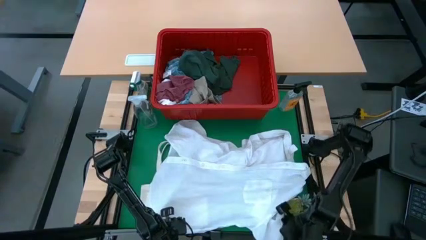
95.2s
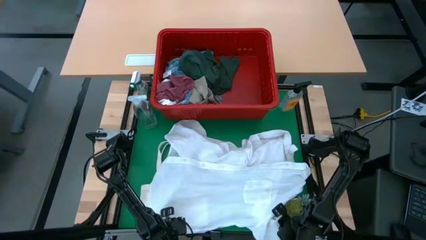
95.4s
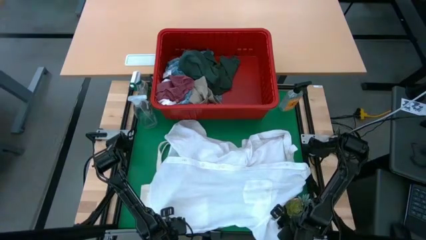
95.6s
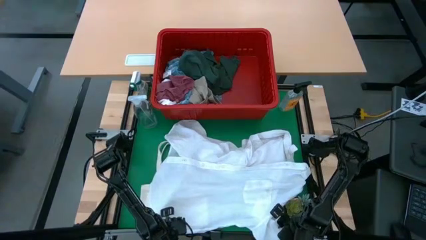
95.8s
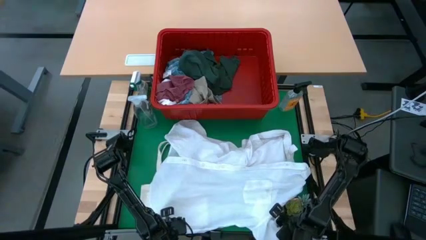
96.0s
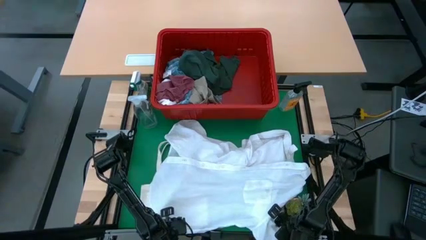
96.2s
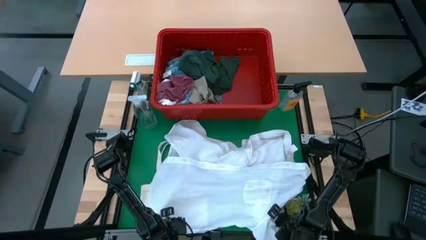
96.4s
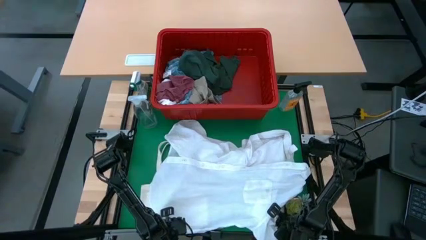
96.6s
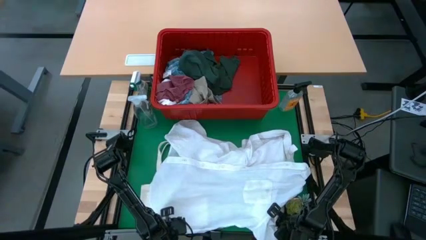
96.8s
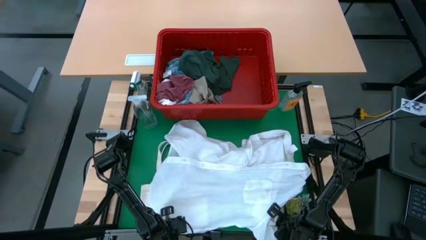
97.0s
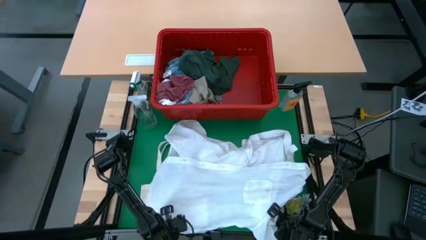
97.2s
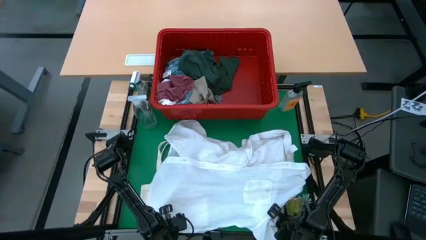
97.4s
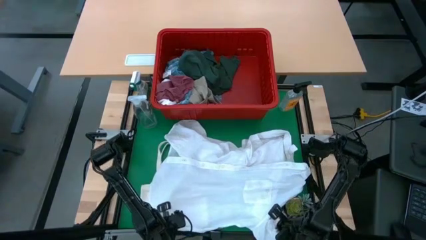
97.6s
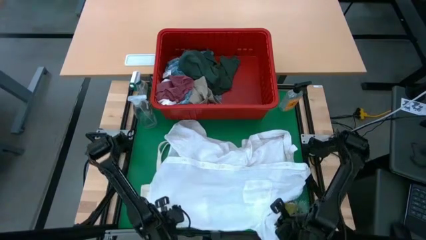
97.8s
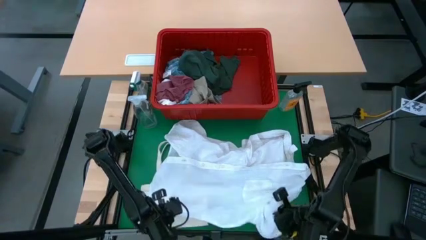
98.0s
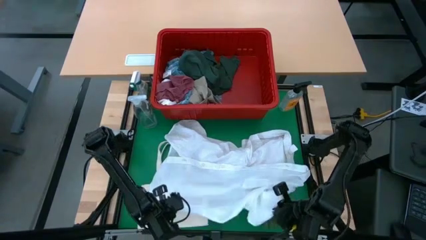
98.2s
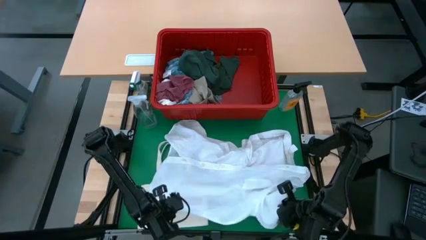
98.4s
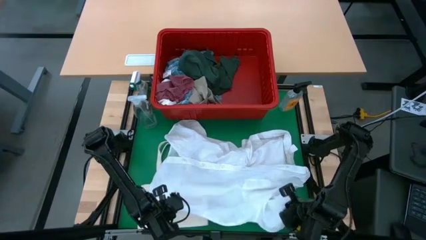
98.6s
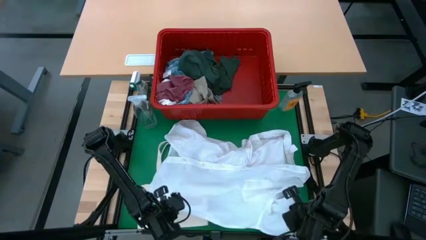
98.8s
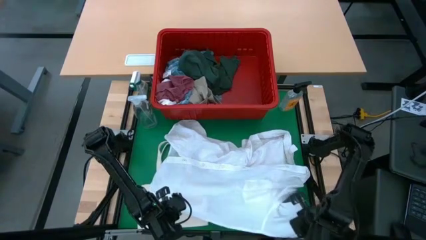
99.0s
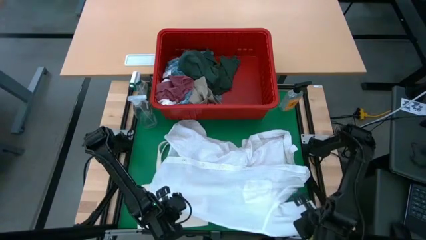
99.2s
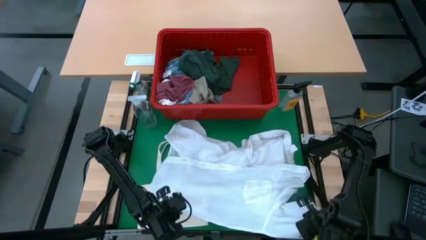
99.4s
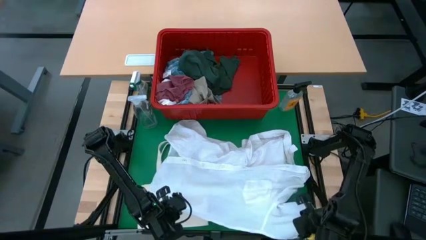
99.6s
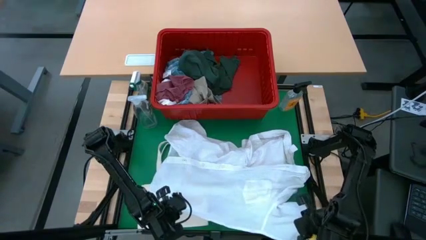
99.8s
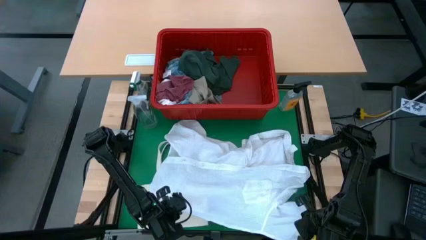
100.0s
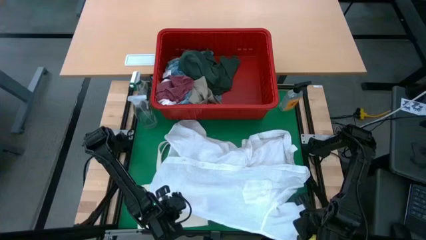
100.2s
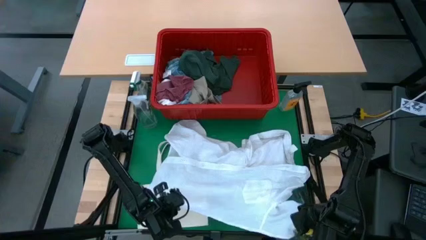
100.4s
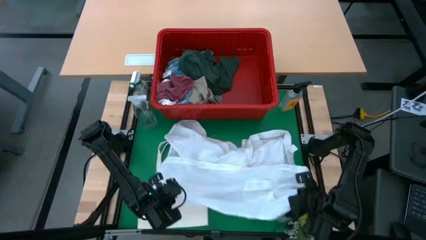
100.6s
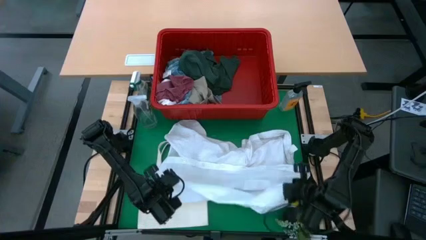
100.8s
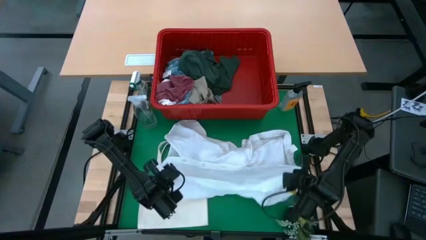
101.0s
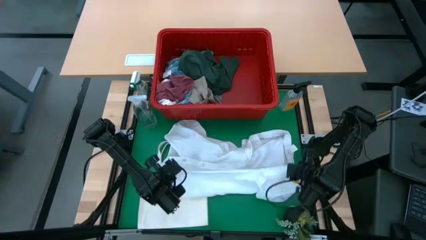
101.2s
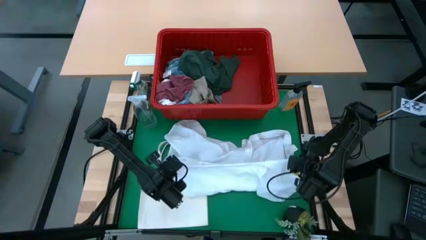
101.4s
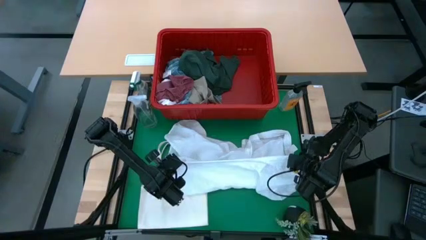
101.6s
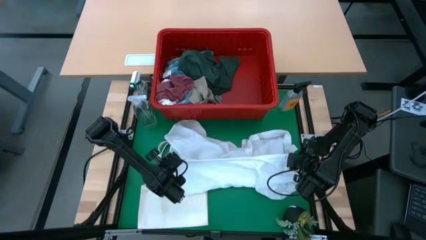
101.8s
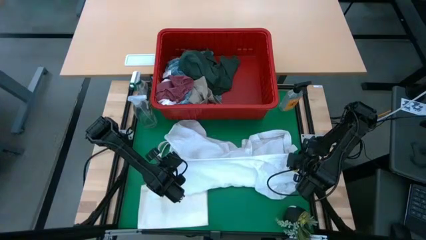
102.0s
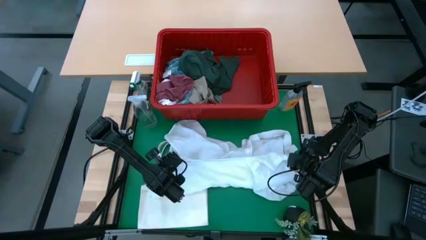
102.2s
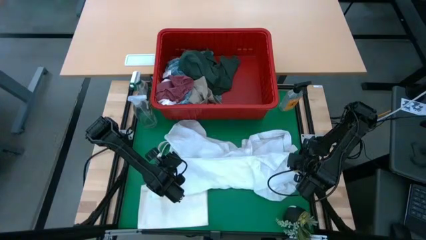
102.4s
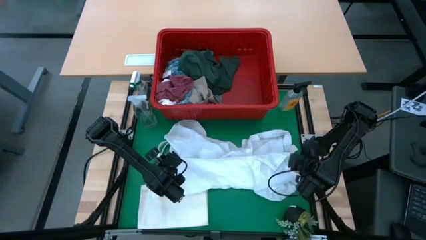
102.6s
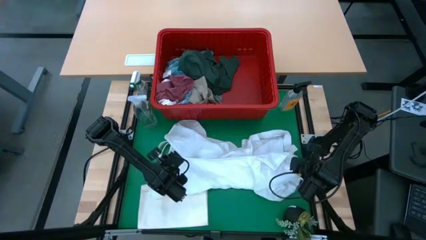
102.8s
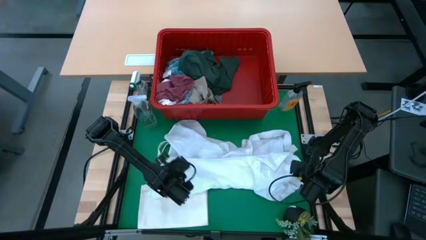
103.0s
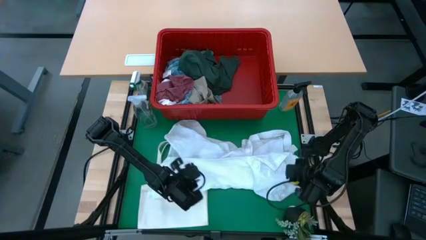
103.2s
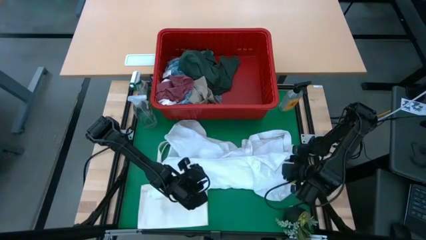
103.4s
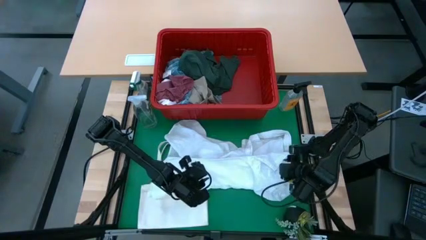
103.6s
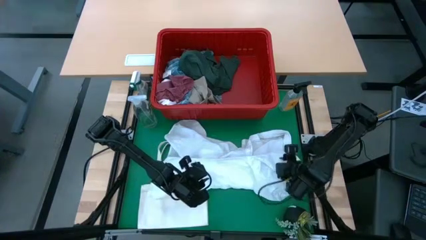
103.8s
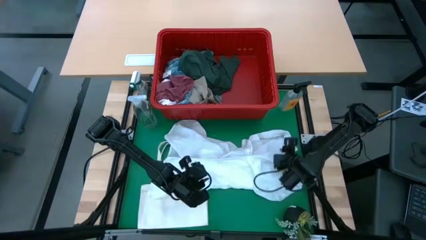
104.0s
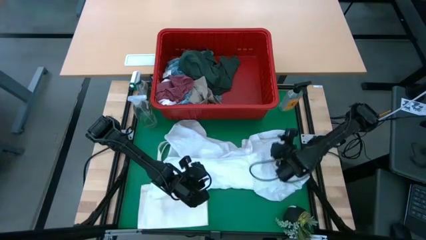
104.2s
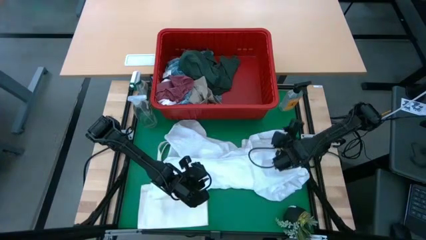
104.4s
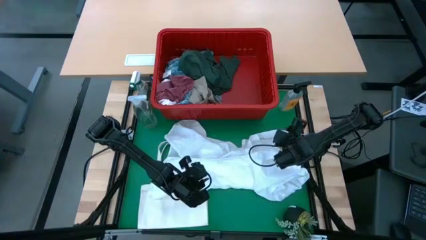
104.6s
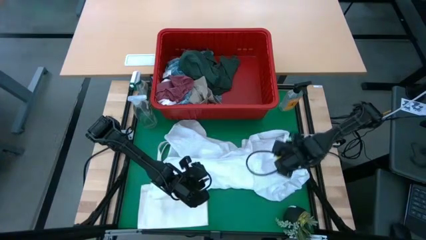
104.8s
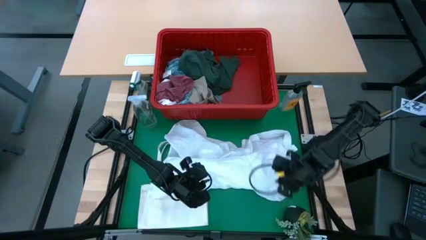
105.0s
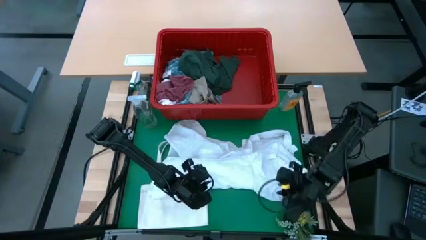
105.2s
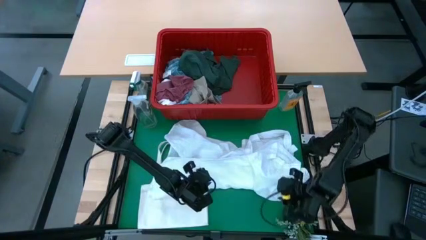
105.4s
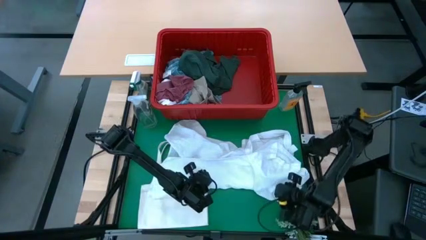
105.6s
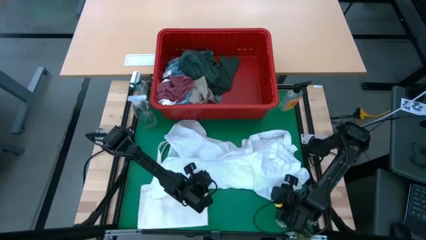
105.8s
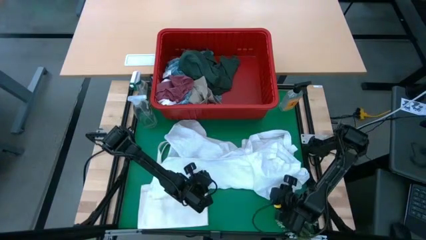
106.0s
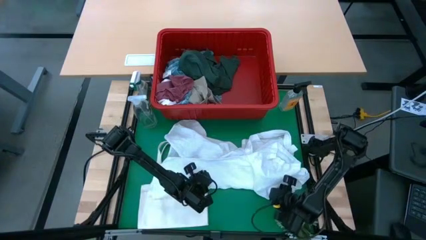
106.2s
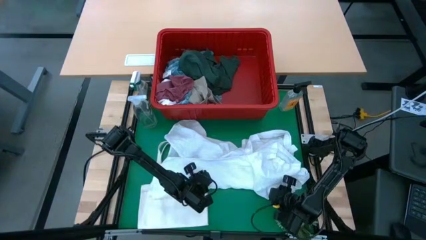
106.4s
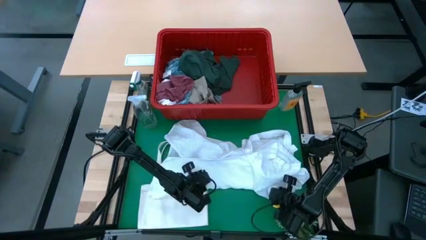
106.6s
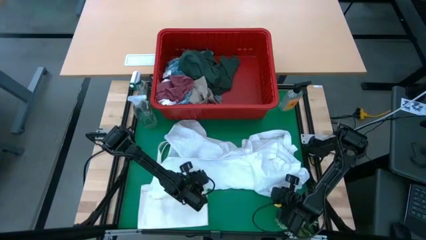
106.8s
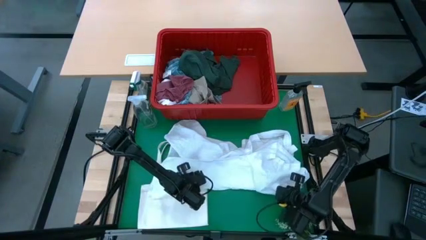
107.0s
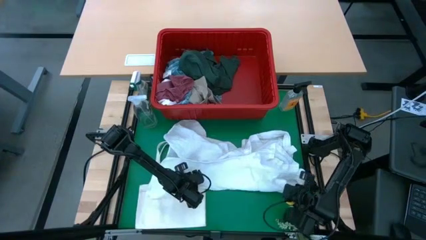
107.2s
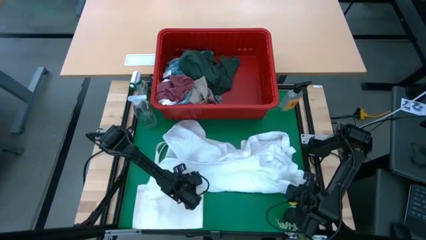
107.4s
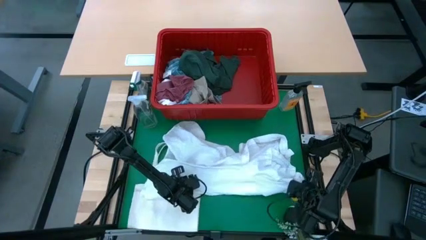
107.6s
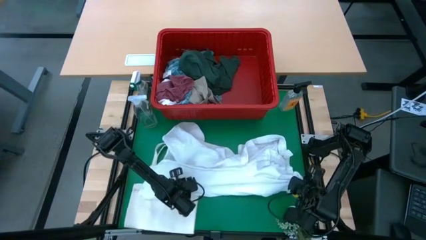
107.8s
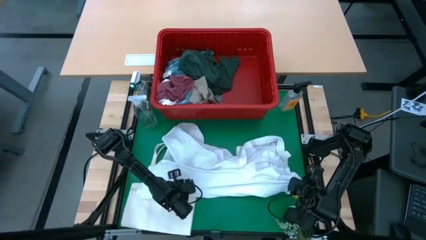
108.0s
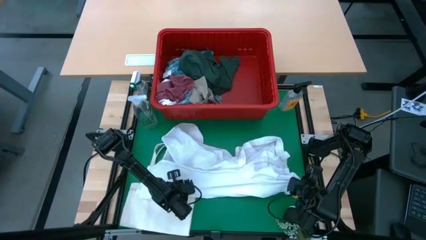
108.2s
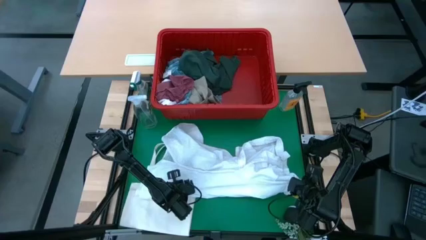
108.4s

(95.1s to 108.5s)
Task: Fold Laundry from Bin
Fold the white polo shirt

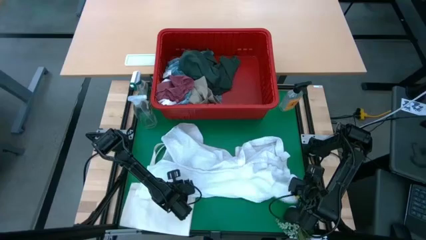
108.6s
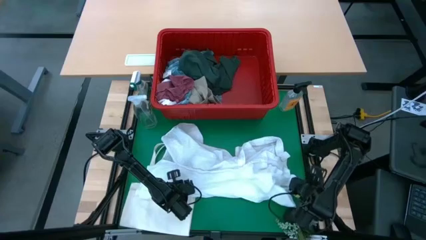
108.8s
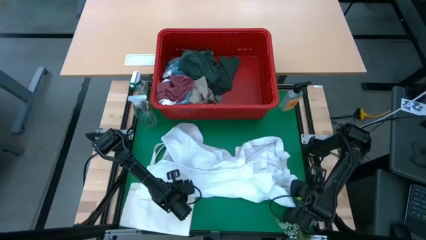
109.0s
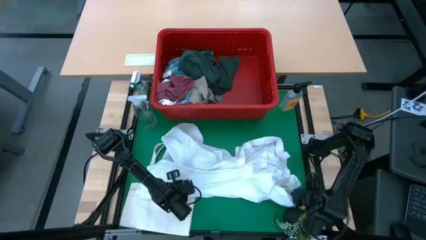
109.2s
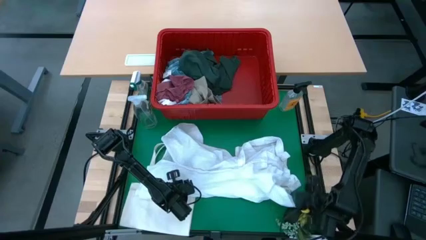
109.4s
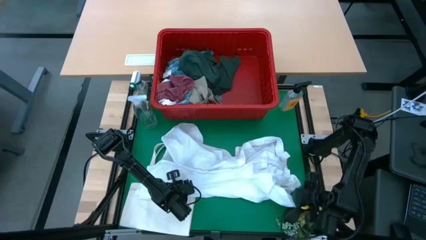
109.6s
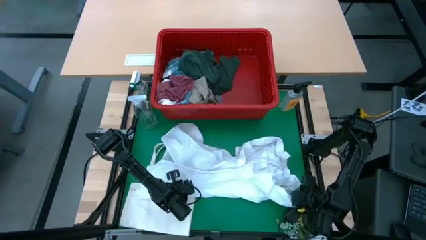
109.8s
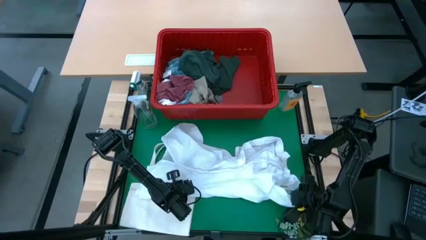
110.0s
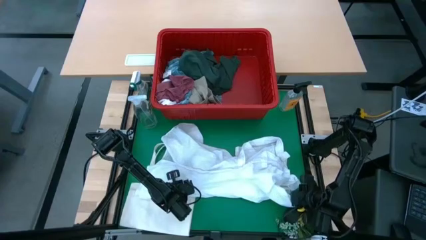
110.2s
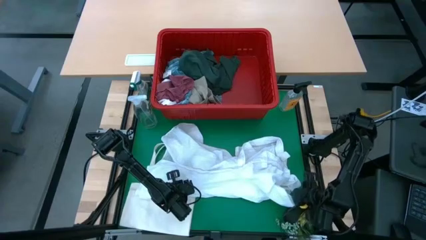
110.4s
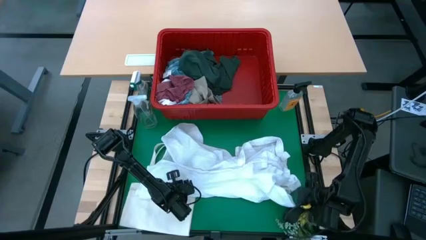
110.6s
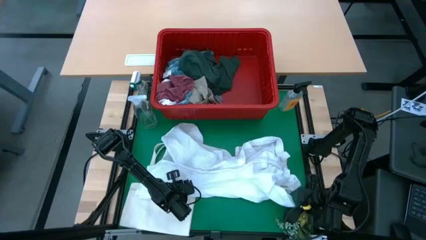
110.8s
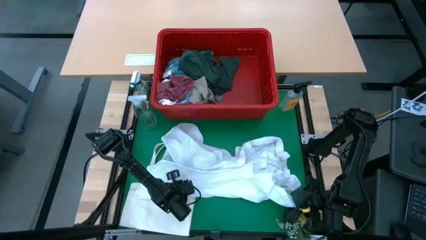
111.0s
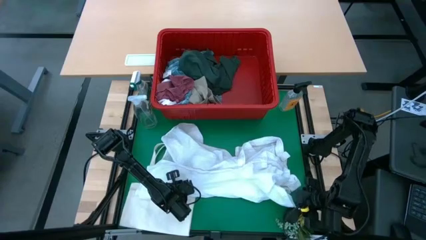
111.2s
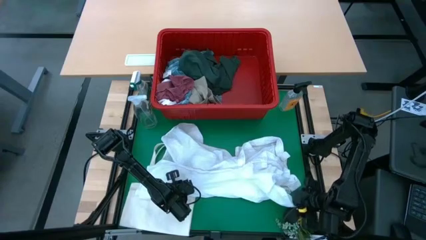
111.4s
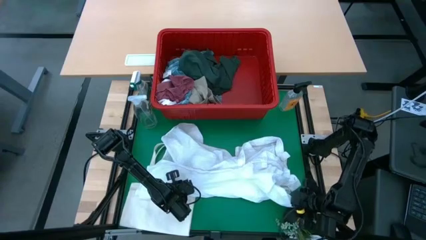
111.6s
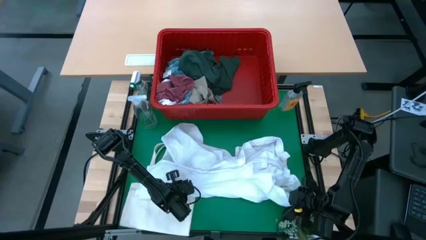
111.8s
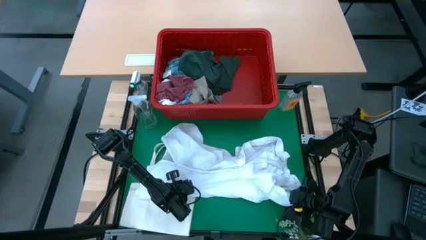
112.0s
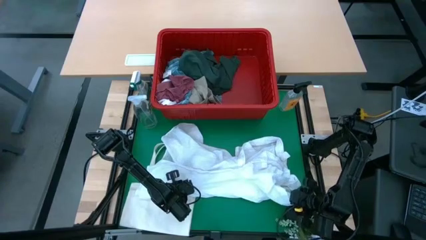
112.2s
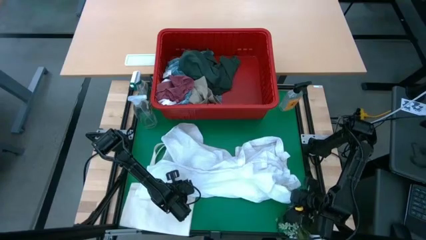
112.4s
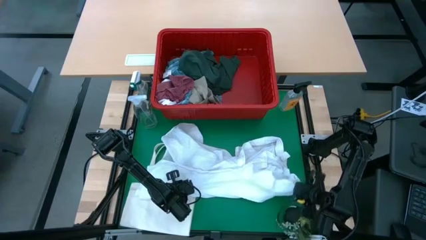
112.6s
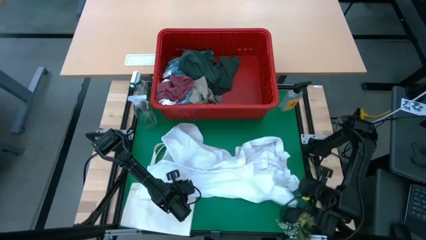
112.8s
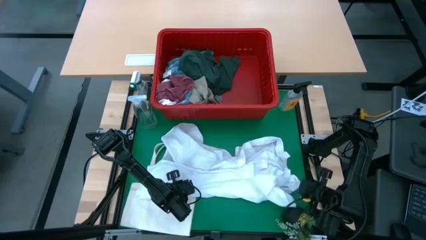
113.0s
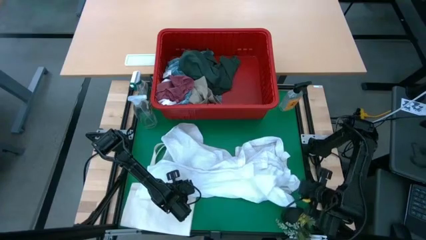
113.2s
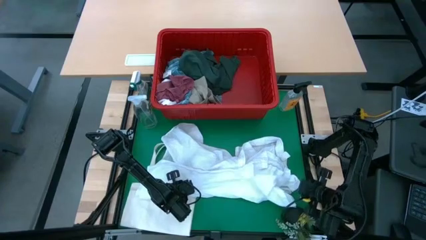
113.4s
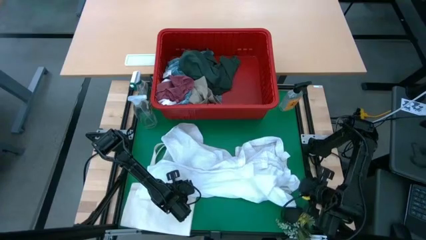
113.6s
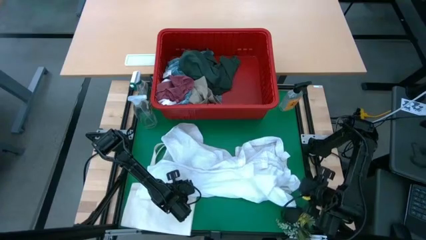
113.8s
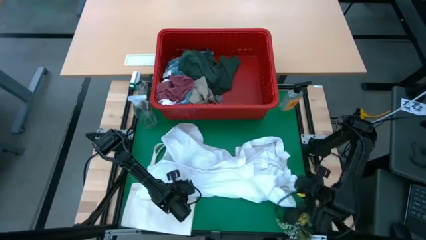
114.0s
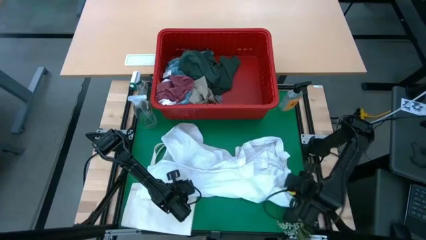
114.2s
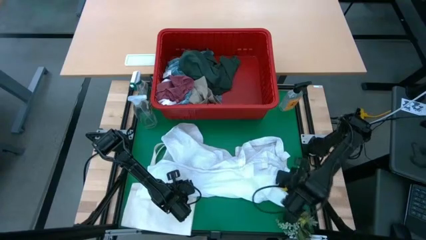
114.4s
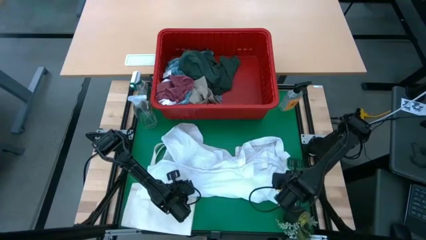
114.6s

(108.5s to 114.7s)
Fold the white polo shirt
